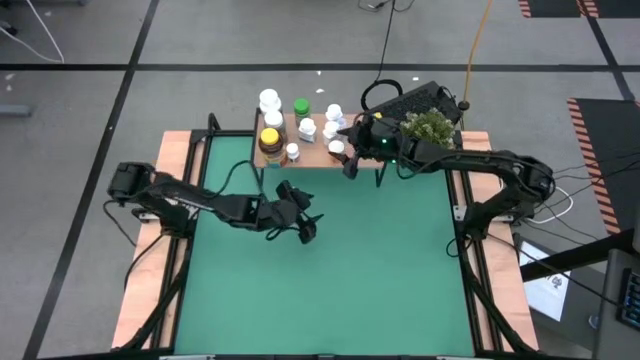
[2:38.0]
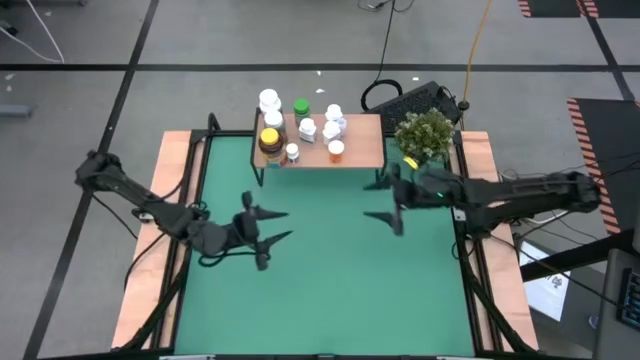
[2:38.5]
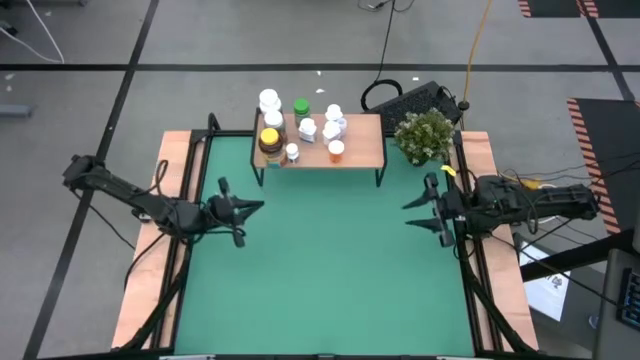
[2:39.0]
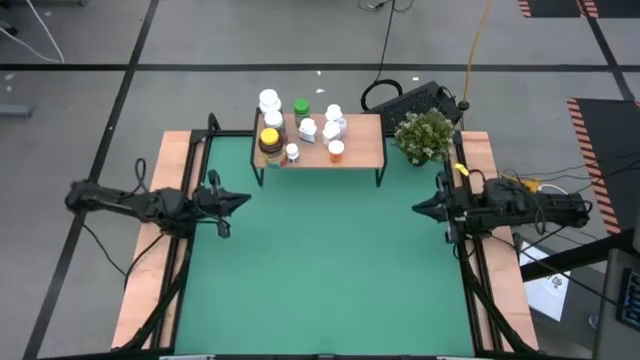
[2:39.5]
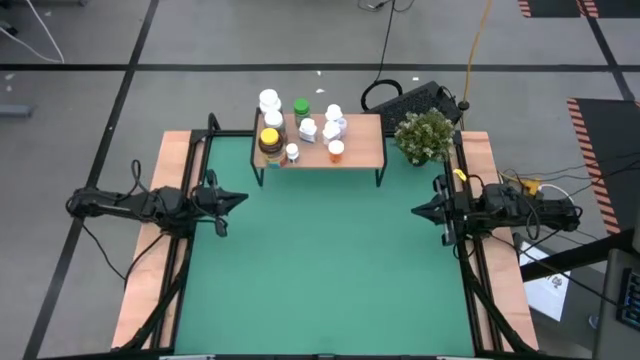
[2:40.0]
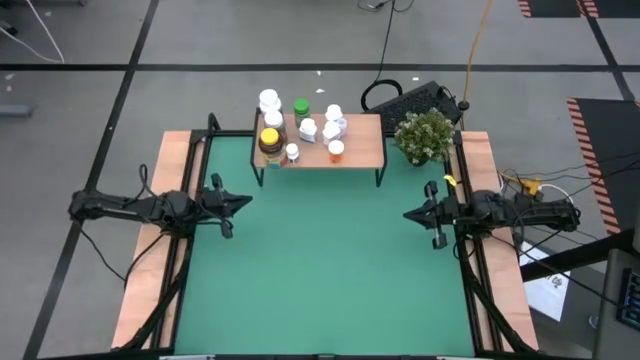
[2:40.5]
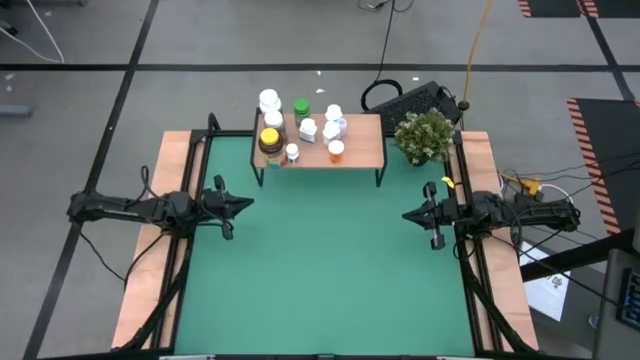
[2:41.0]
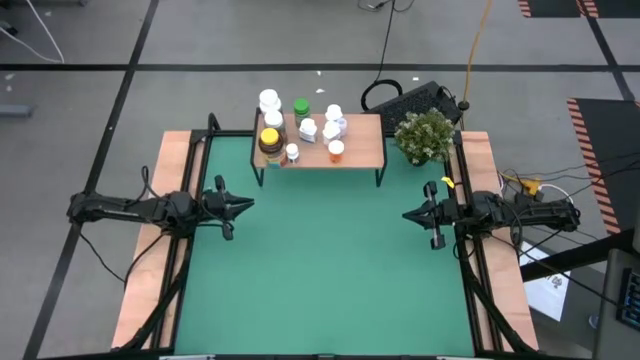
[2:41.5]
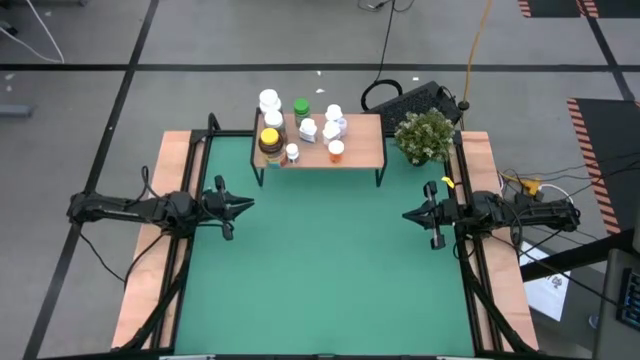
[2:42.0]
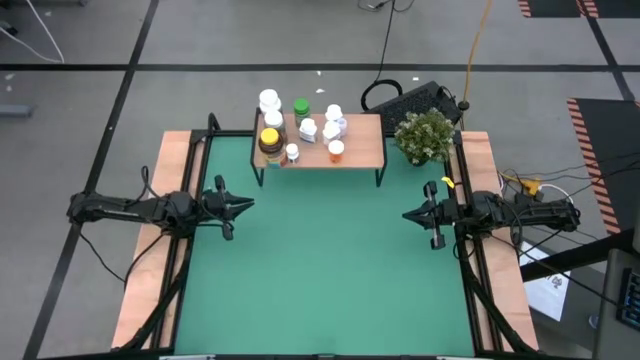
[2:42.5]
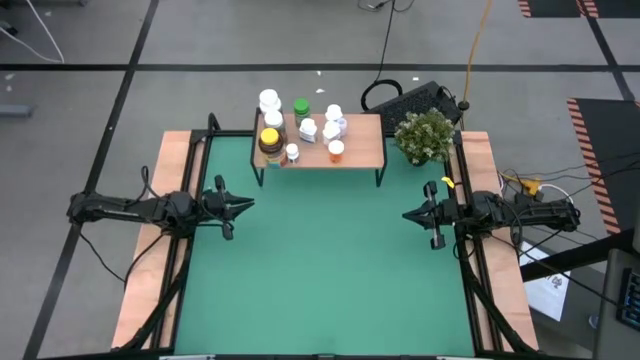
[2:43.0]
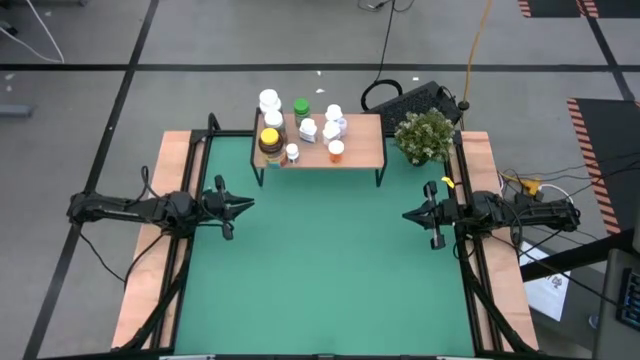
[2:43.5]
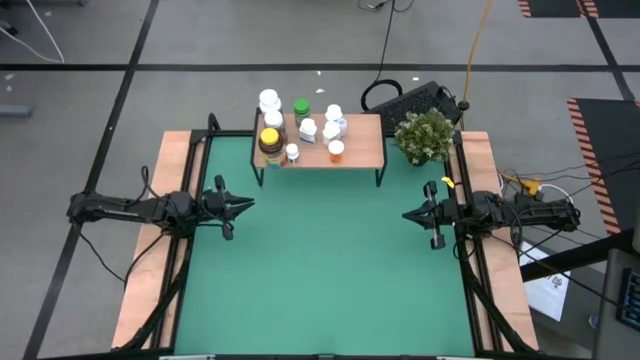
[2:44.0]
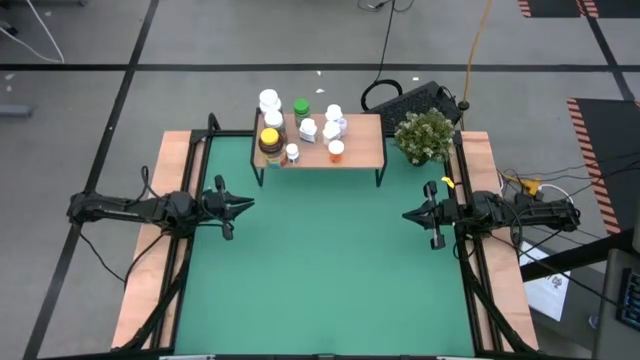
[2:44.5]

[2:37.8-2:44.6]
Task: Pick and place medicine bottles onto shelf by color
Return to Home Position

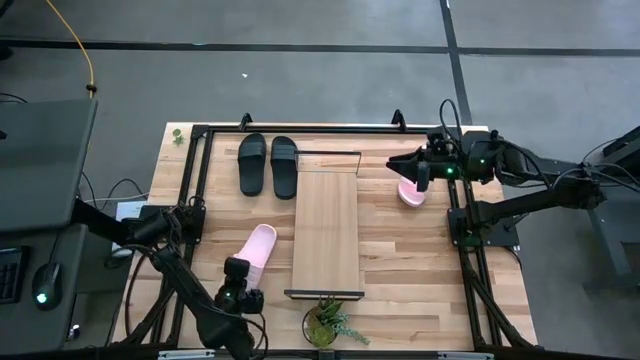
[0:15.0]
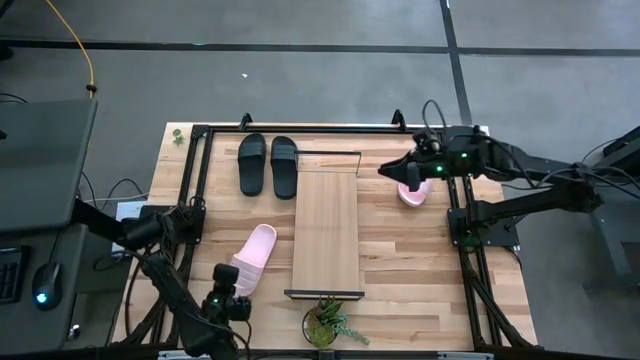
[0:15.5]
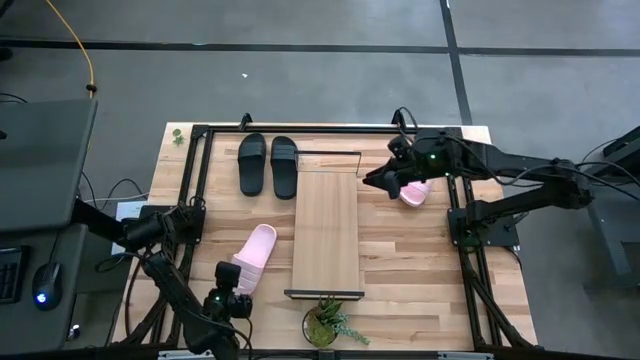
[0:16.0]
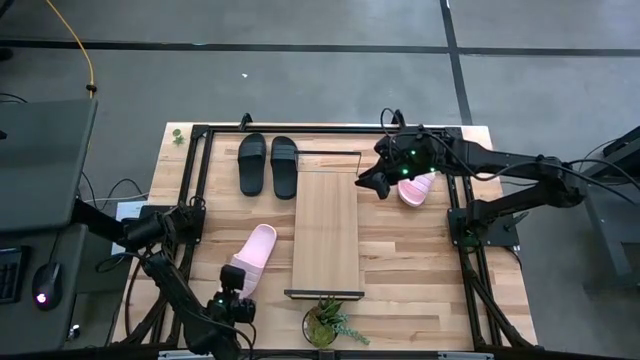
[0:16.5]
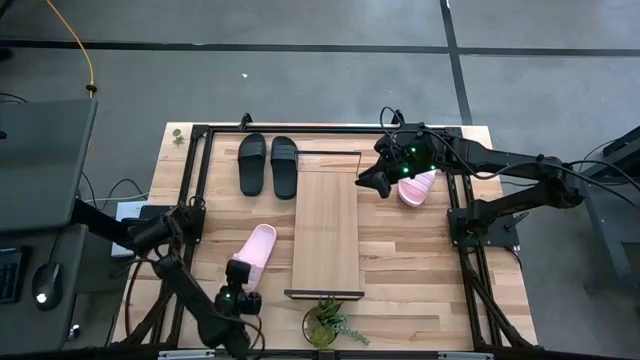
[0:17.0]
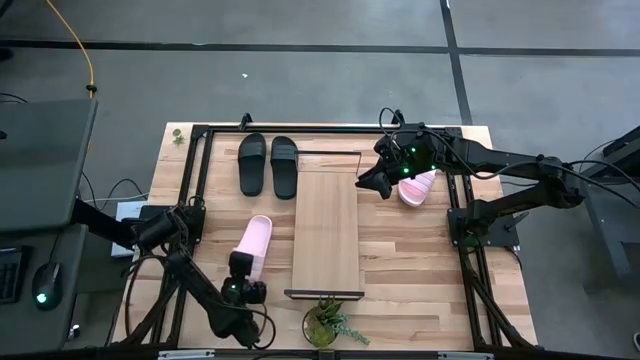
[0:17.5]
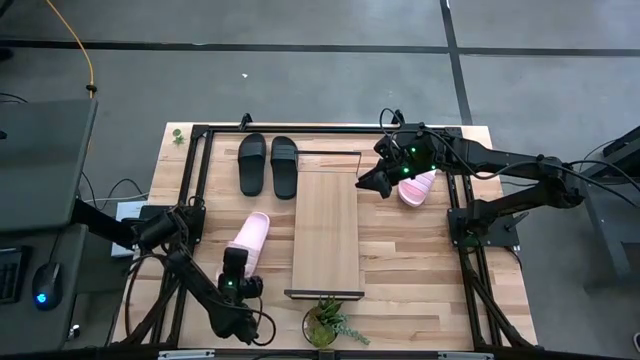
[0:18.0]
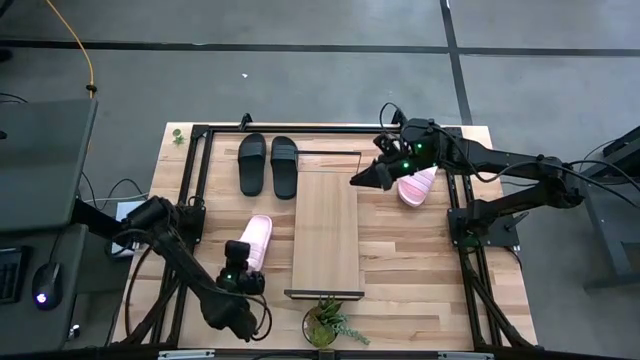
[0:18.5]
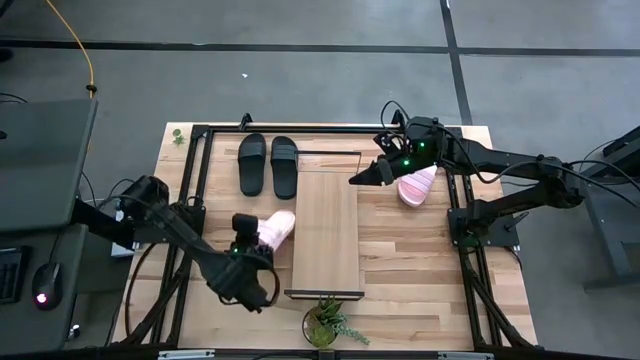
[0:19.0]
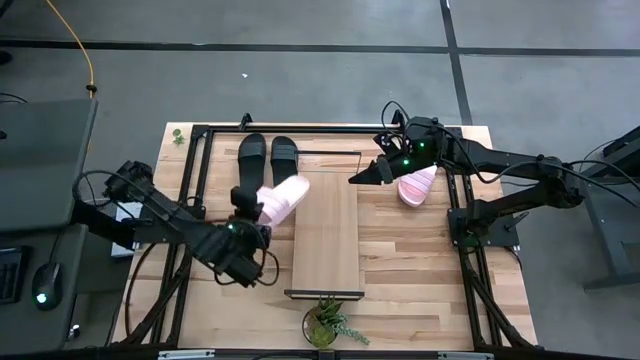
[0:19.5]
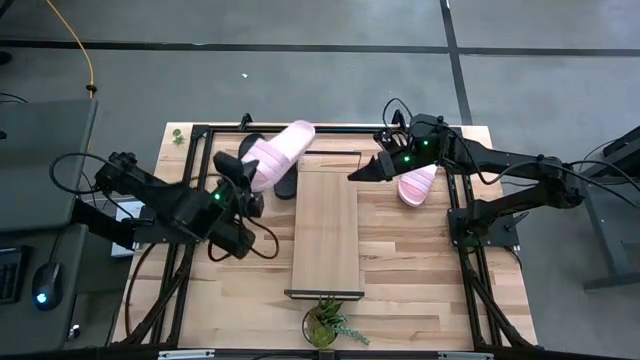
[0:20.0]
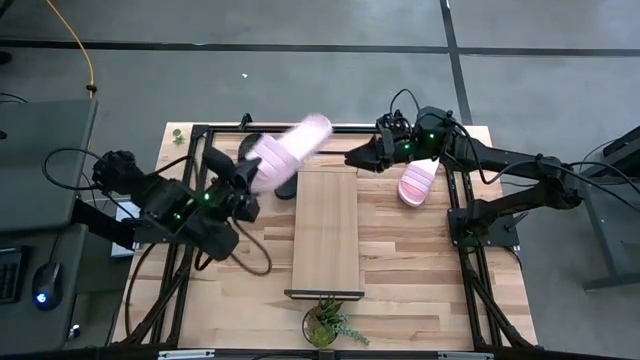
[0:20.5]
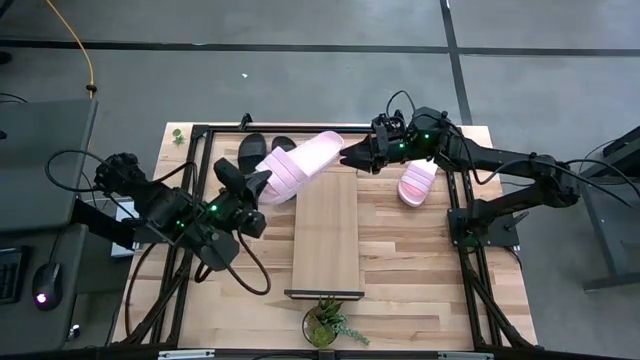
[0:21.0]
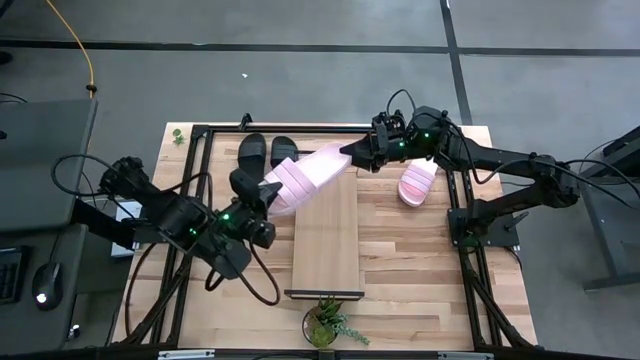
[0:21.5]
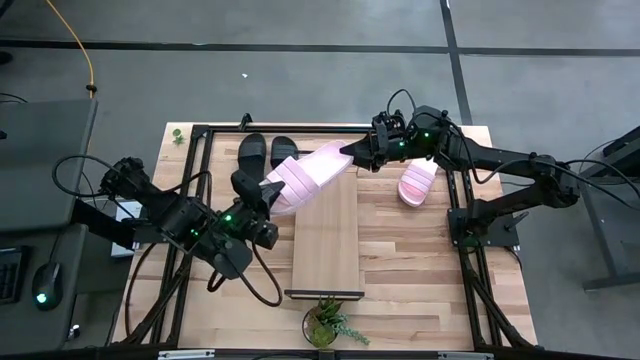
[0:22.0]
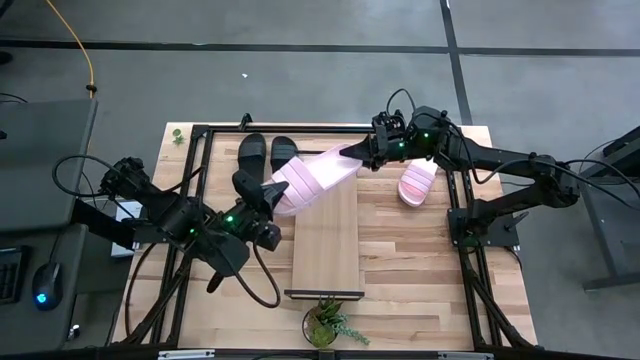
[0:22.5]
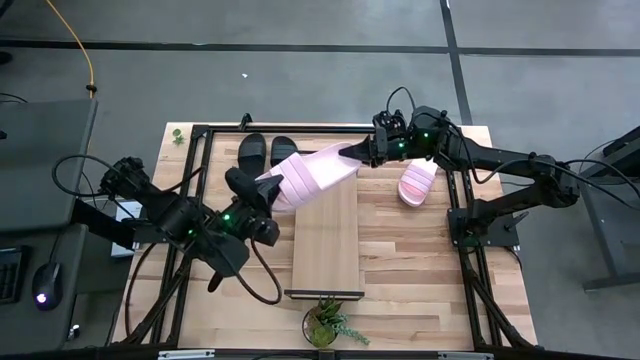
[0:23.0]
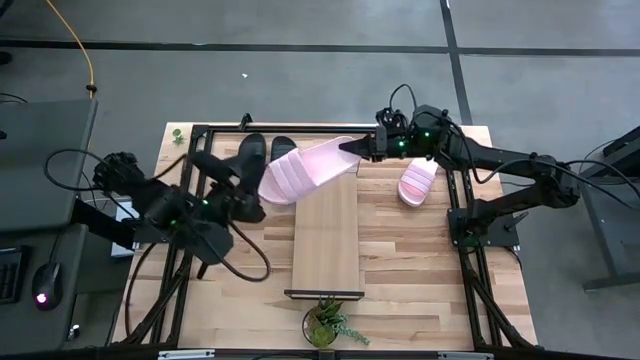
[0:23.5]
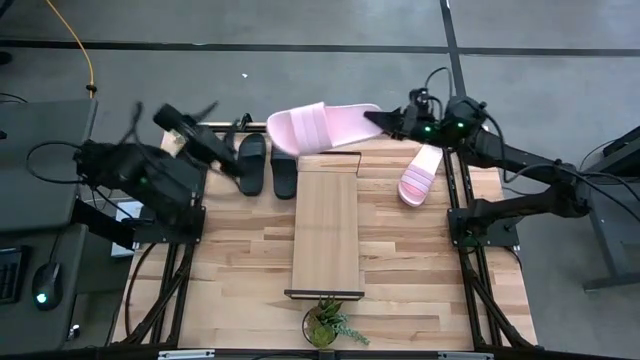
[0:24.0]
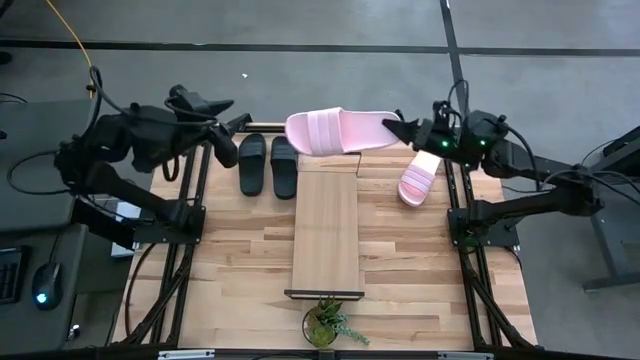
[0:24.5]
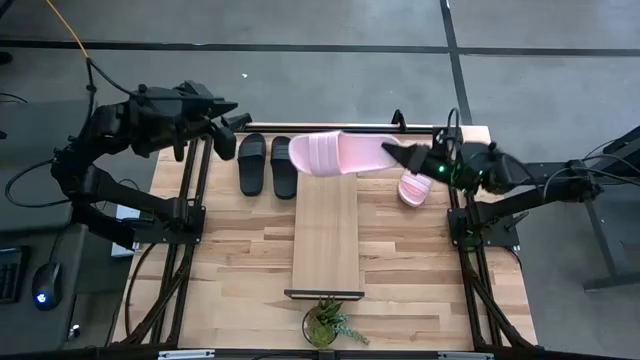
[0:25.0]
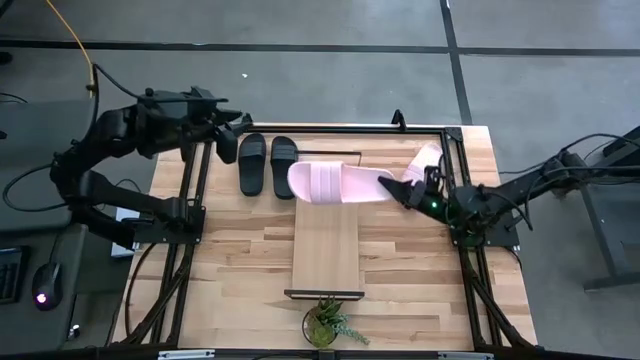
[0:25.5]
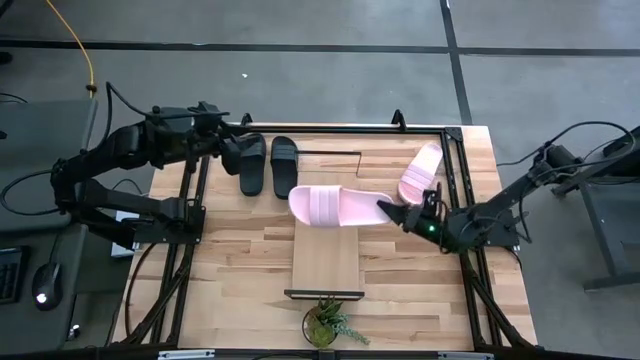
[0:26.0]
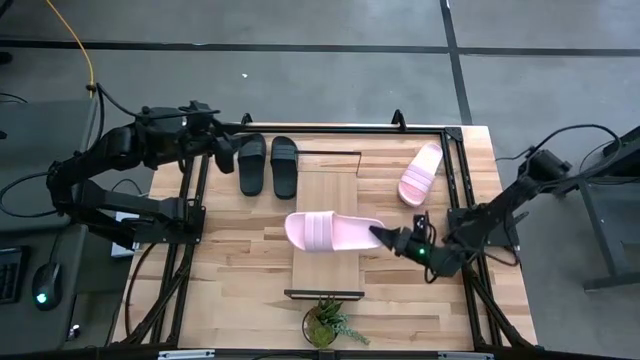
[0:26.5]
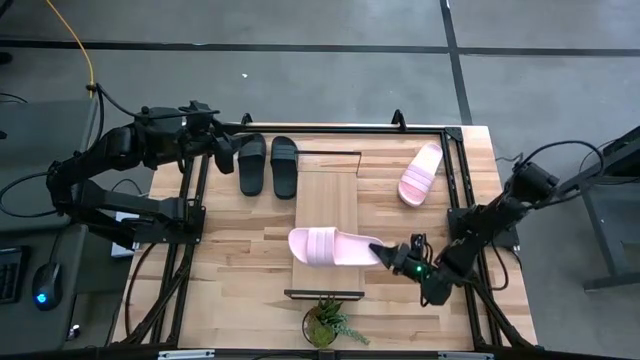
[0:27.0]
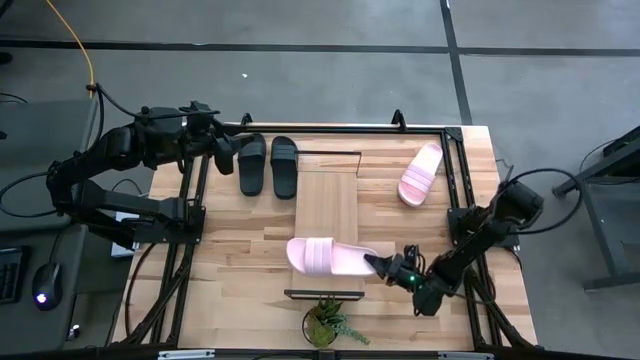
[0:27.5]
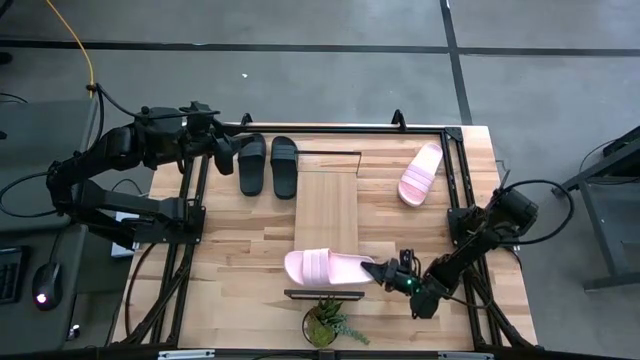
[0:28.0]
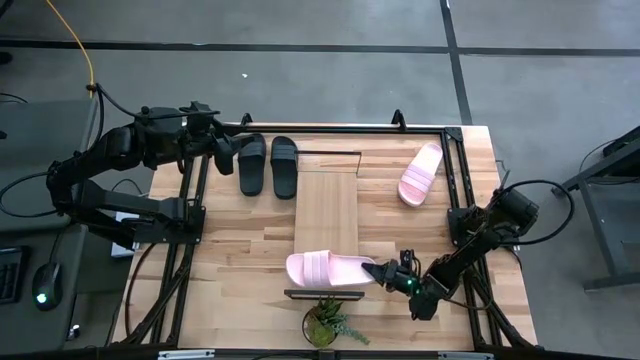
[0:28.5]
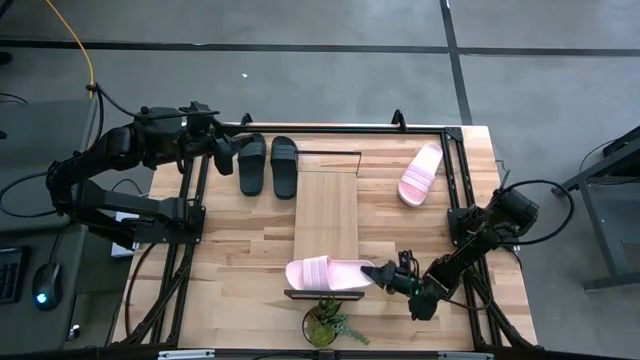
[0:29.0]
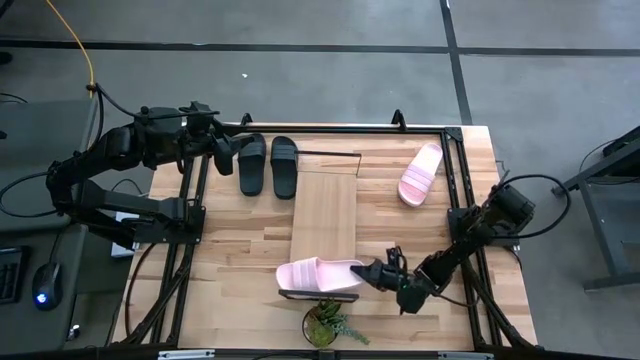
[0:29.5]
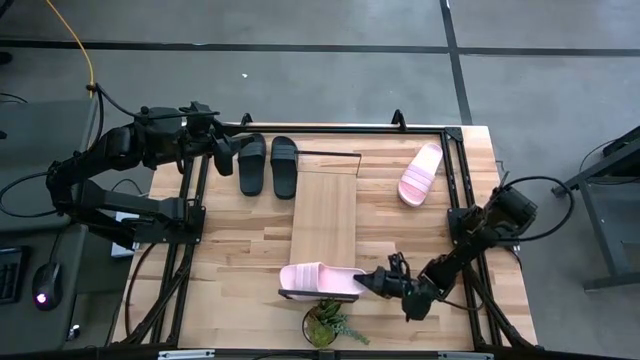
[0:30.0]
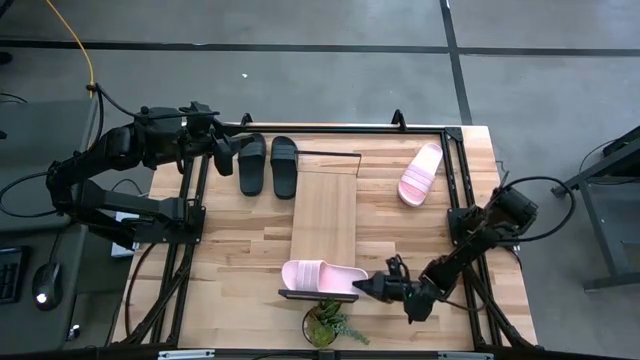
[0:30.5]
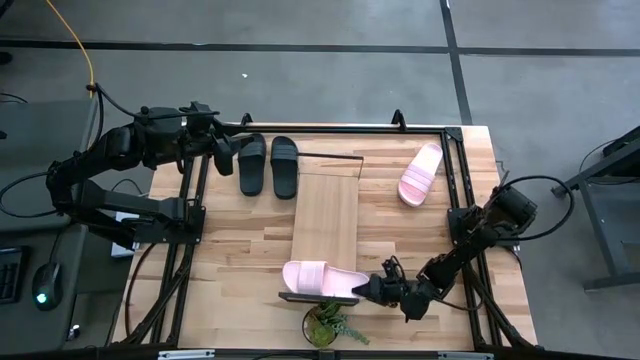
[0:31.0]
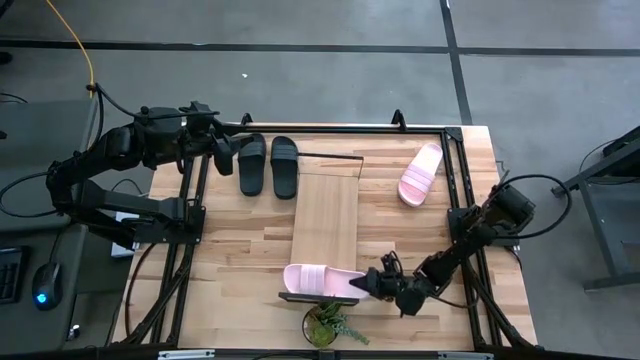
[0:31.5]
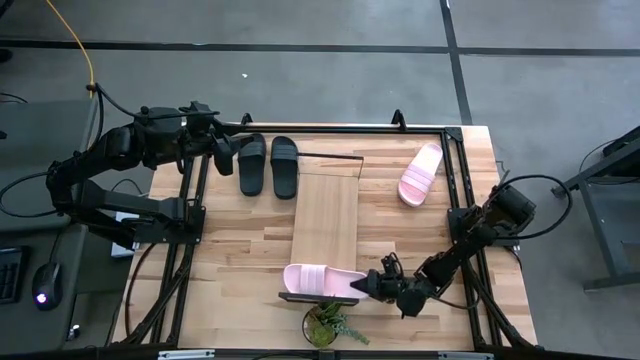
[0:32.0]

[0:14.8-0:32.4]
Task: Pick and place slides into the shelf
Put the bottom pink slides on the shelf
